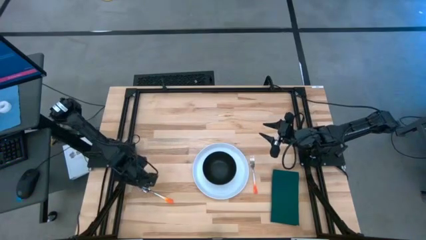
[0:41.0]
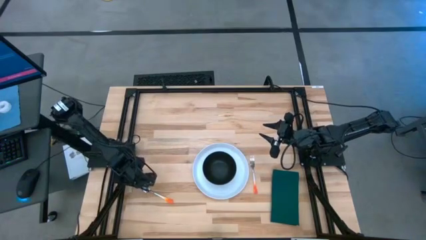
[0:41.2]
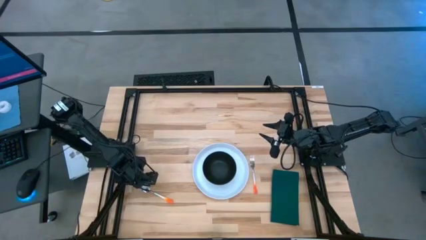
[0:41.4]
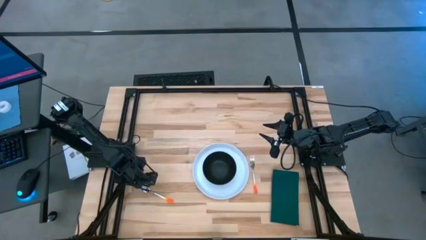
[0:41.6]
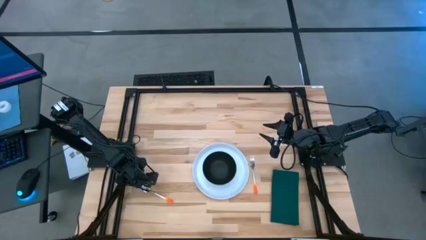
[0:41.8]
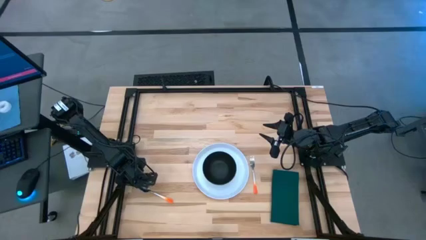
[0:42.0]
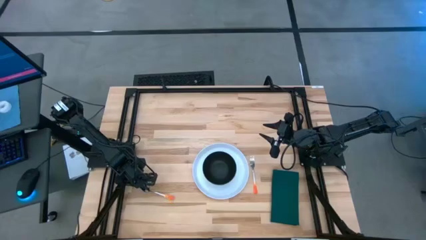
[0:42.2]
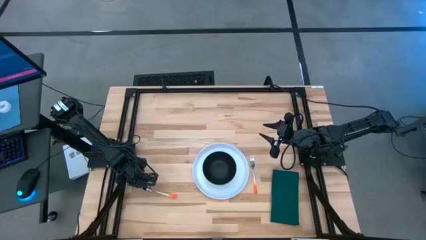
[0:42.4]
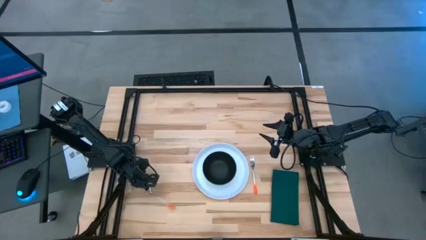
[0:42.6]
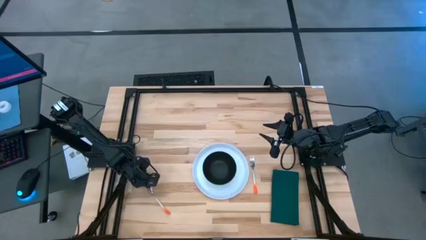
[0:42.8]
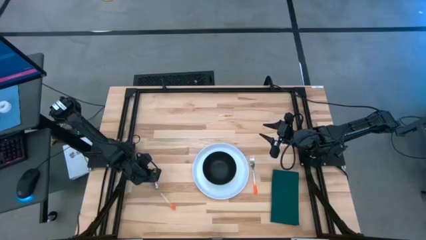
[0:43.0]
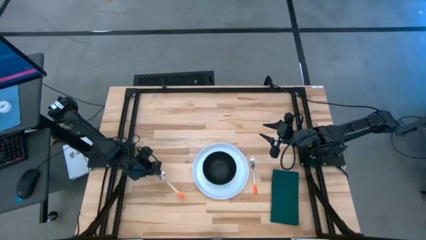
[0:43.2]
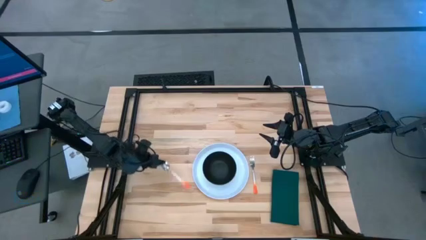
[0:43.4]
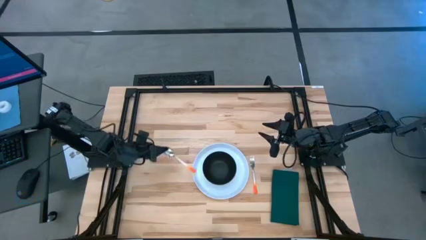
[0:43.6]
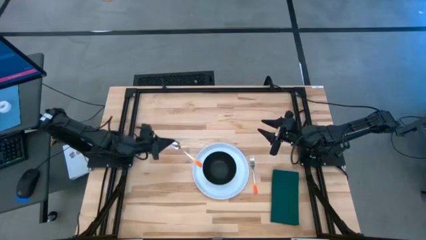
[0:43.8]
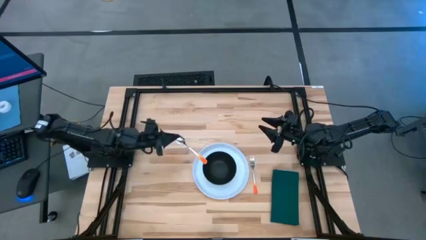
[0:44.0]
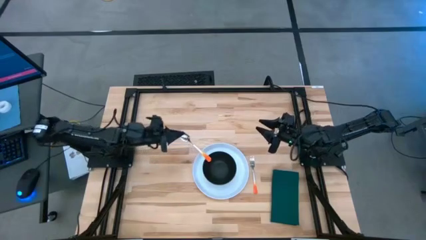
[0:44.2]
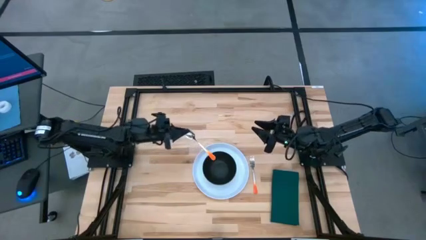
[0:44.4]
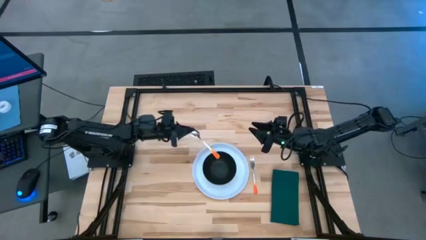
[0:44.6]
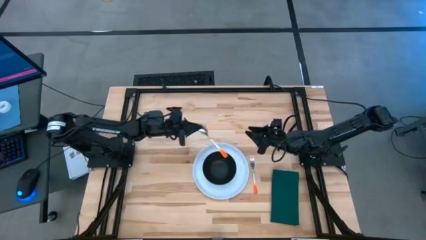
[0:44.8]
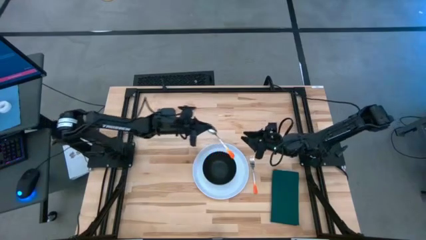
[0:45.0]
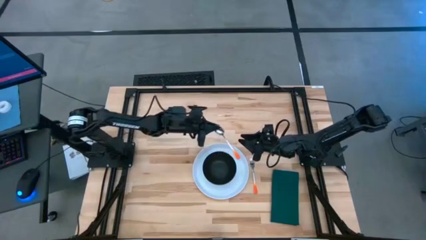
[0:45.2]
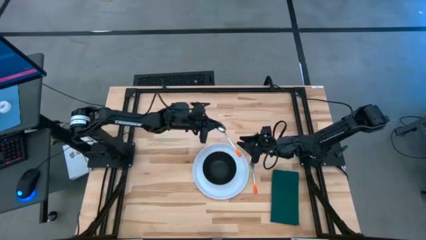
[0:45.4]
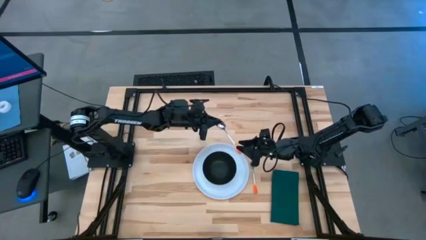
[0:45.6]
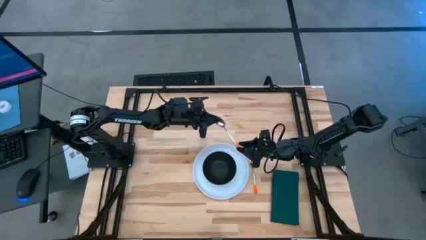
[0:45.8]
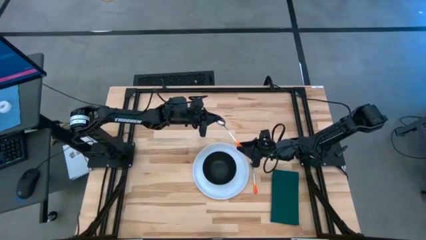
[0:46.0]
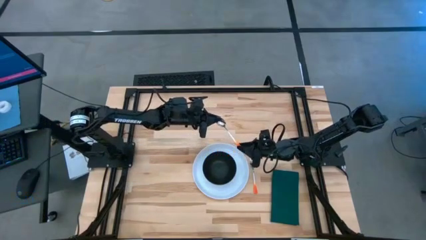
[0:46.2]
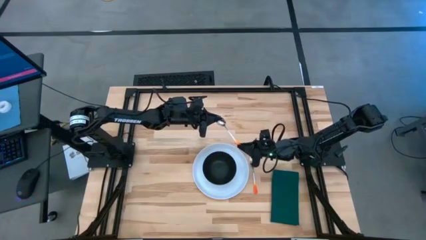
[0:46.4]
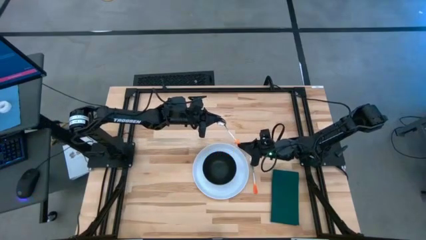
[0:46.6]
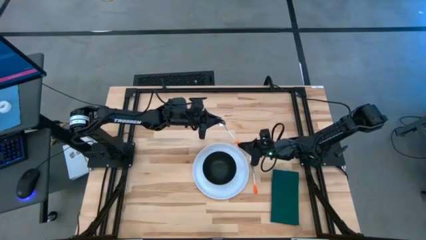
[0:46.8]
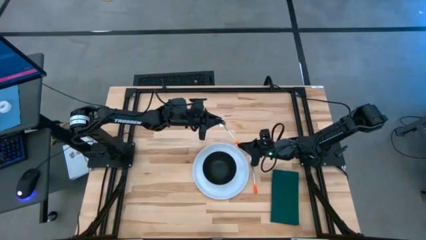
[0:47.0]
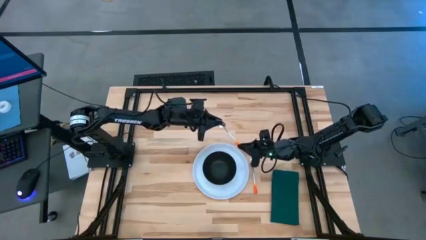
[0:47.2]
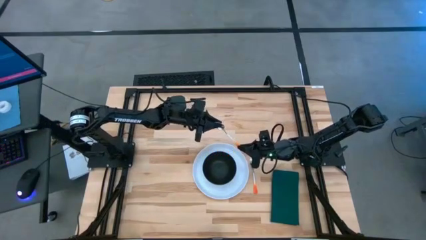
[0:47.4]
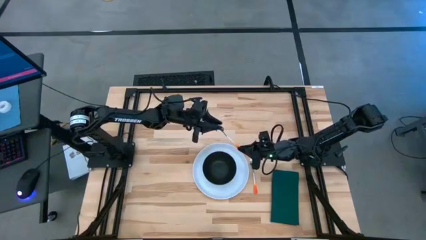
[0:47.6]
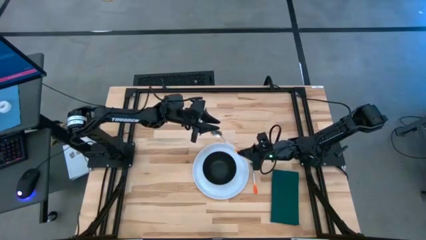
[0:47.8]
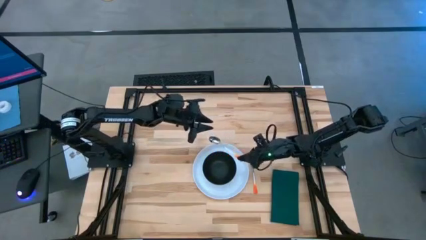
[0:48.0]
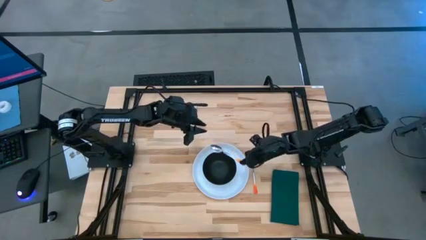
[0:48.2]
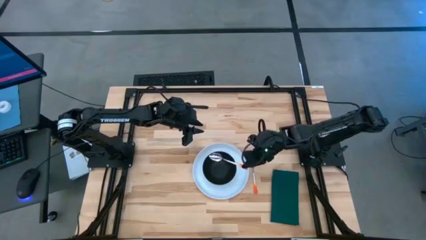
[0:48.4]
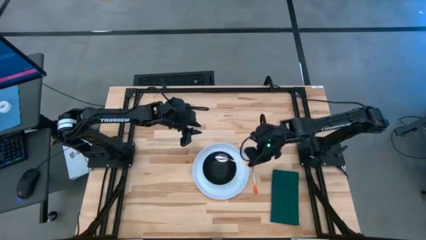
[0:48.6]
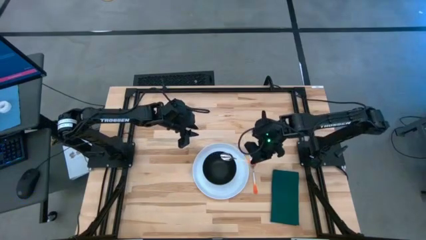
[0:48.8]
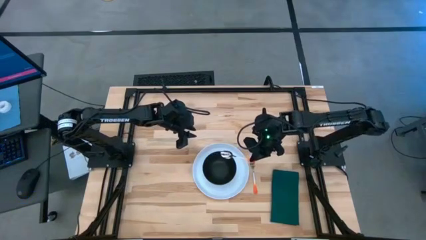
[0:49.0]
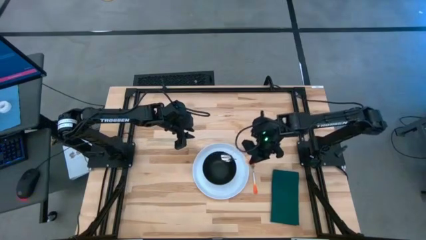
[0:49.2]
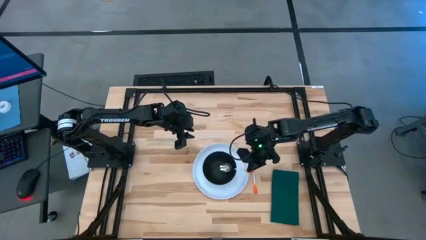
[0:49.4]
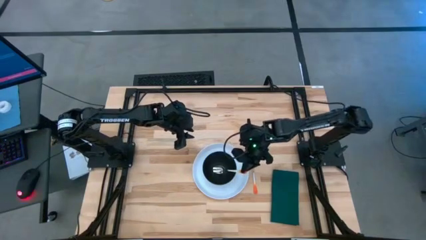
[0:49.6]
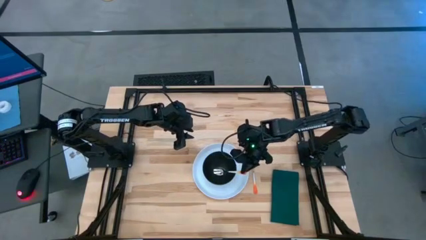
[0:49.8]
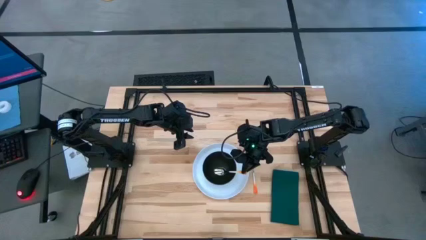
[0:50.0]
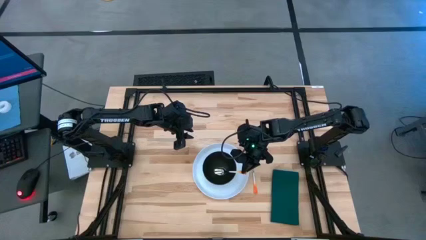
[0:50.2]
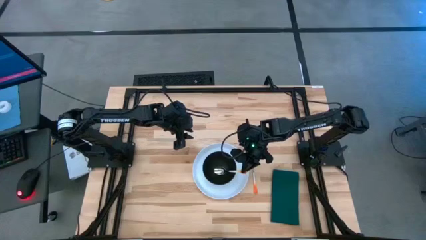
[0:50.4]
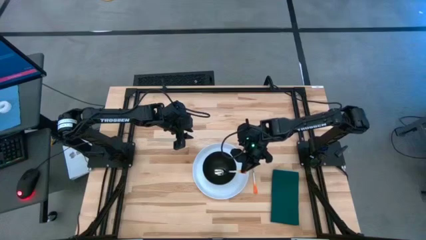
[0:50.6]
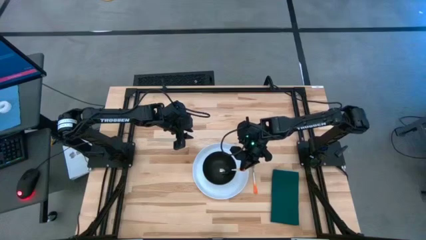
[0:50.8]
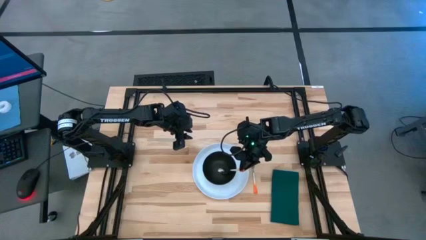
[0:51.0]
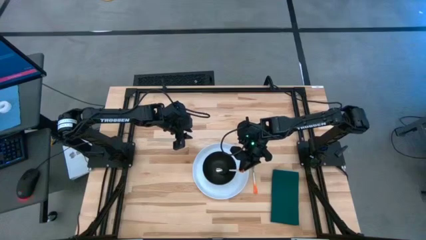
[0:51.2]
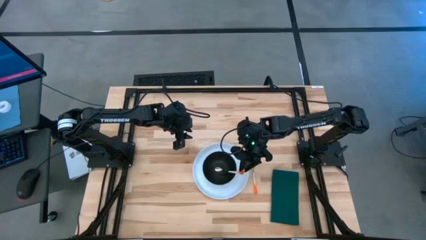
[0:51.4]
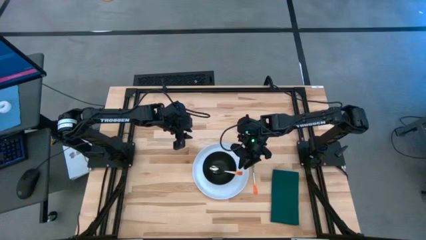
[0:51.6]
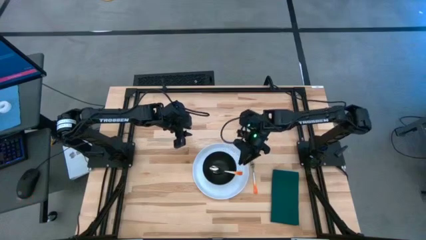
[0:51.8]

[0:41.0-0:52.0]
Task: Set table place
Place the orange-handled spoon inside the black bowl

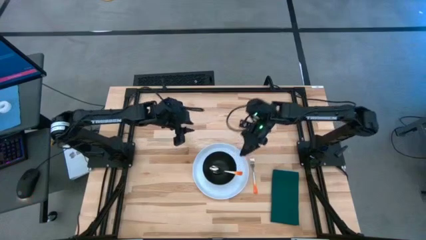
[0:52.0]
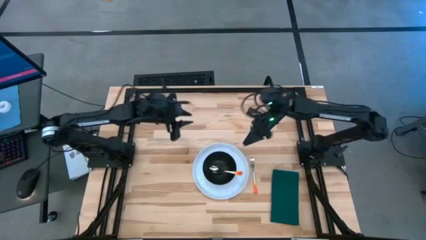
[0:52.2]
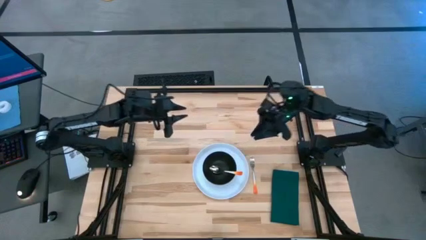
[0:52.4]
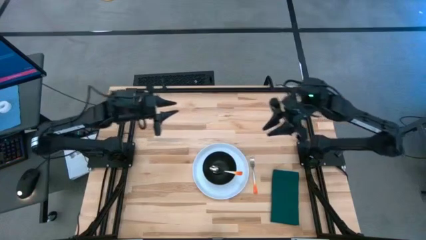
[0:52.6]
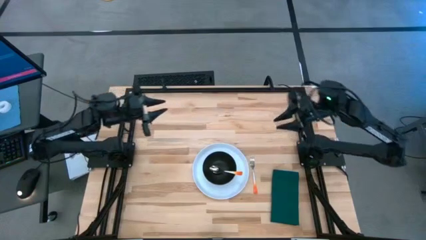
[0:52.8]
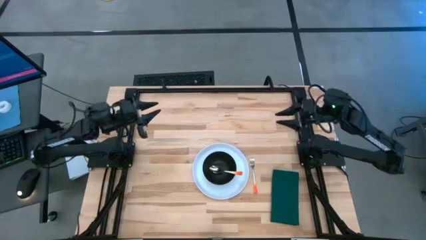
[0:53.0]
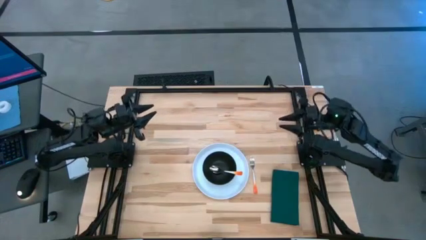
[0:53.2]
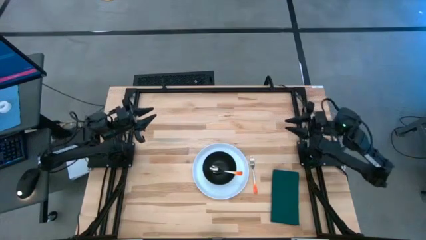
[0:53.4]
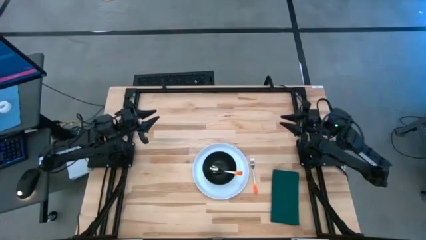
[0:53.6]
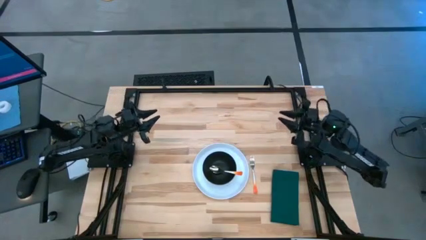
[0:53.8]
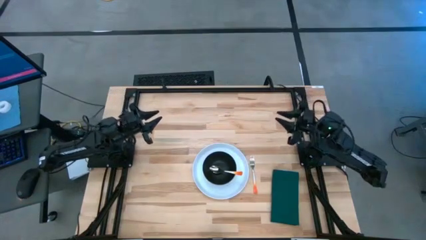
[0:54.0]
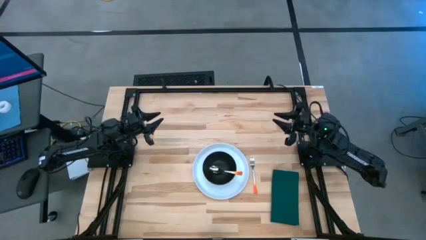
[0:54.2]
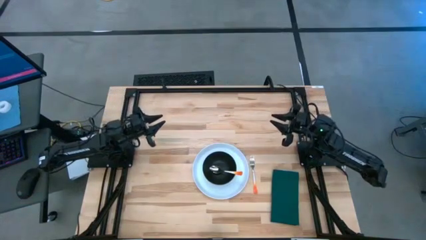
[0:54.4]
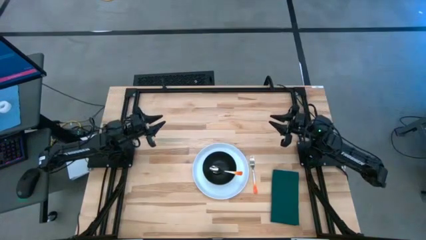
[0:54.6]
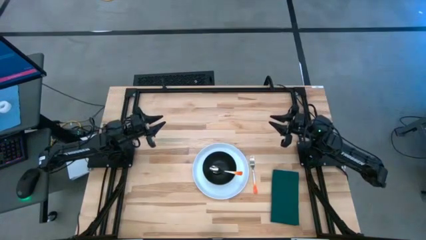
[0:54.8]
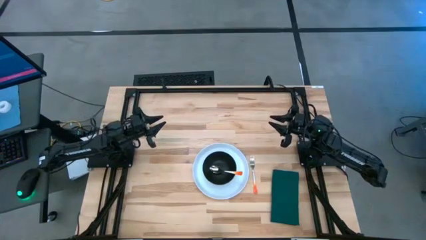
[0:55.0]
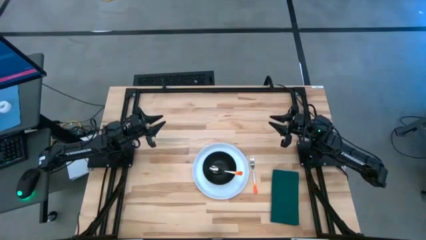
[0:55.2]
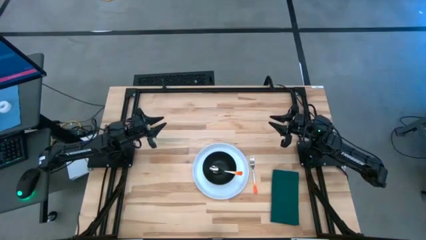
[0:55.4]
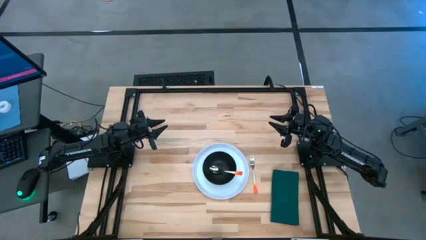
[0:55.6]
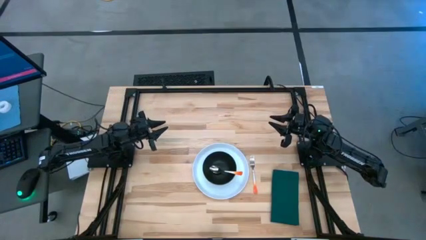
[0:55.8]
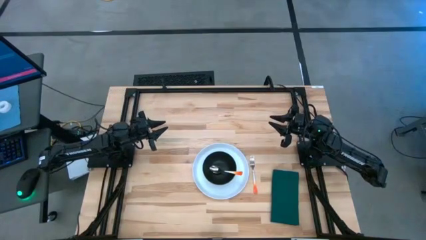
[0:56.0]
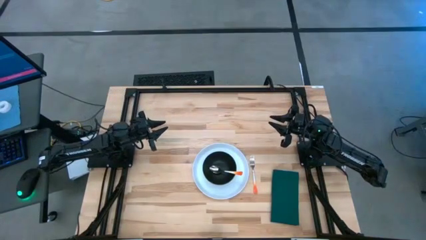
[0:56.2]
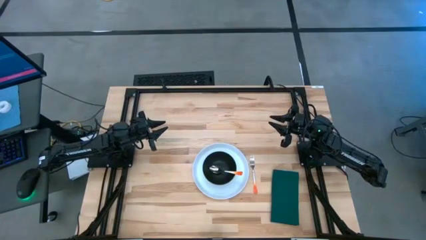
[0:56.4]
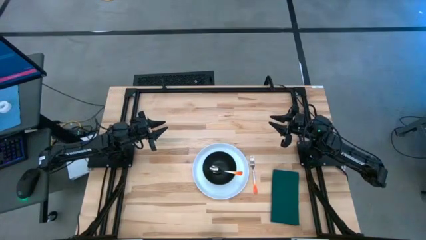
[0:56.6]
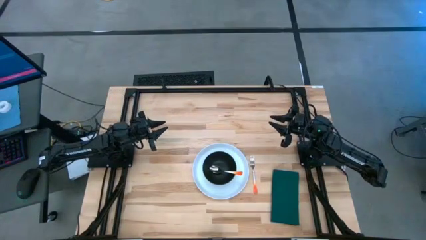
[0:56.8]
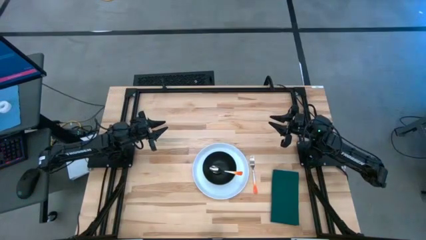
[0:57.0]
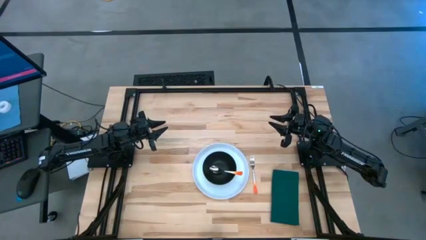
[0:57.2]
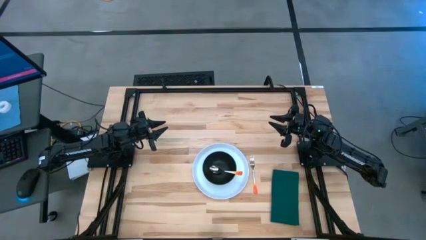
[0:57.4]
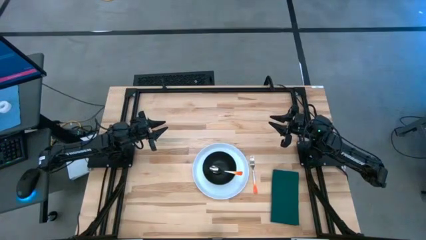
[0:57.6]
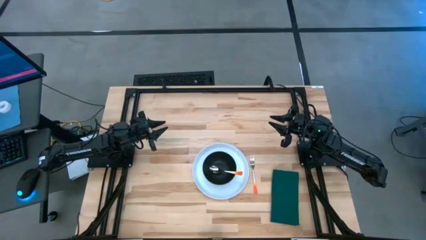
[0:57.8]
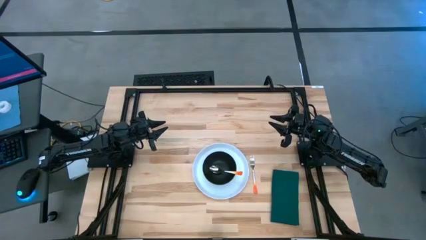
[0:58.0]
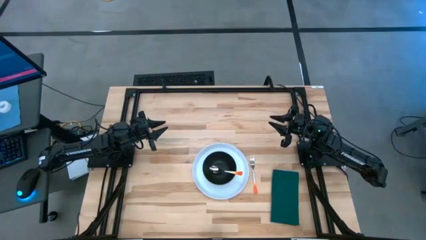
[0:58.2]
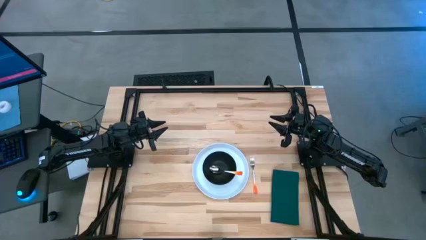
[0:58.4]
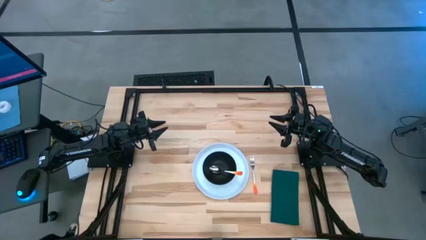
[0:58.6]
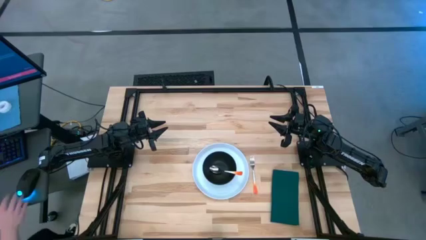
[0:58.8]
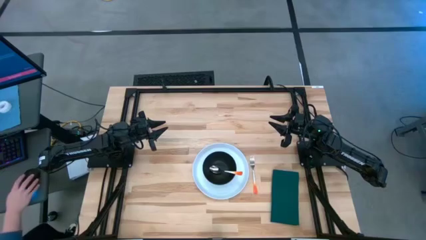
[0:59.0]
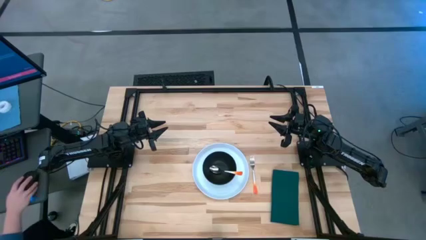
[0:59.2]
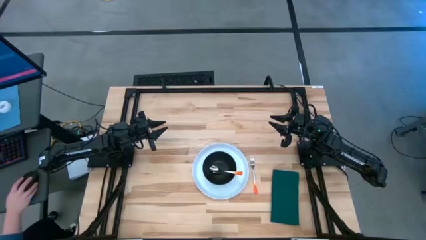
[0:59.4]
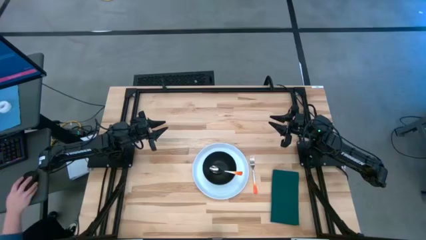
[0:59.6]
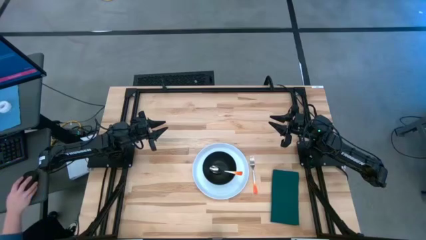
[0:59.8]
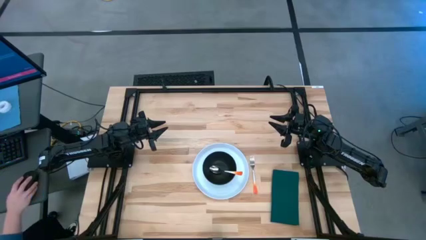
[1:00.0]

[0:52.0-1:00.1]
Return to Home Position
